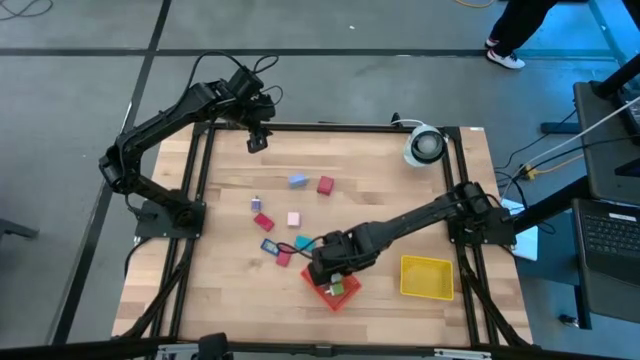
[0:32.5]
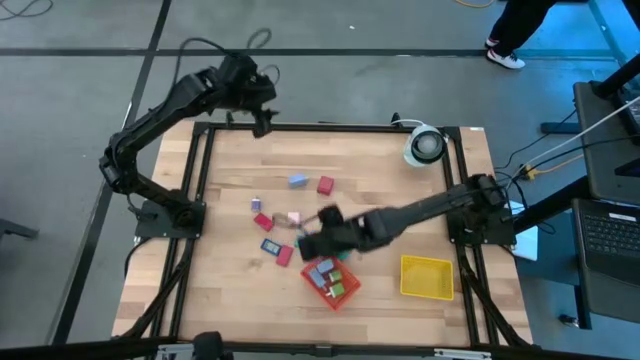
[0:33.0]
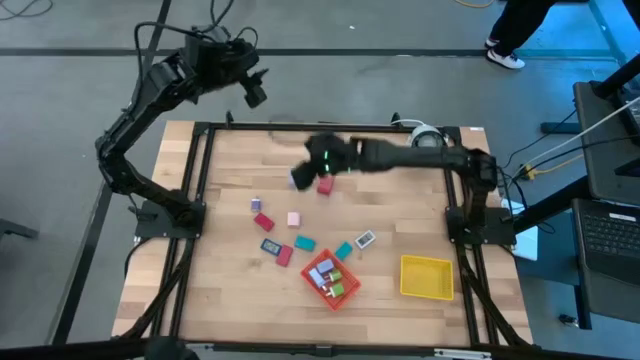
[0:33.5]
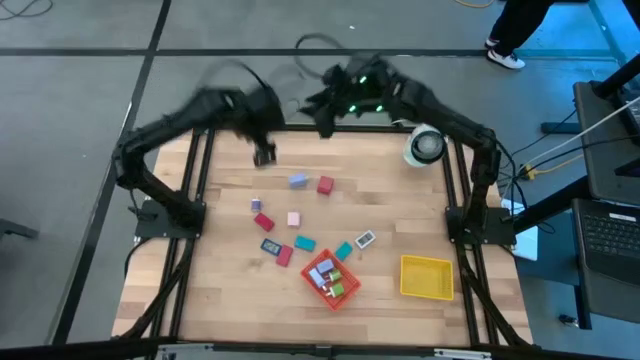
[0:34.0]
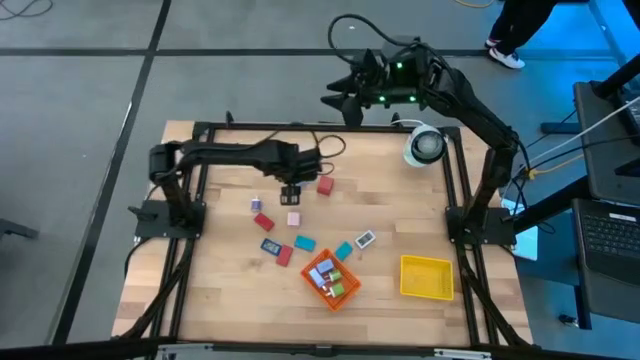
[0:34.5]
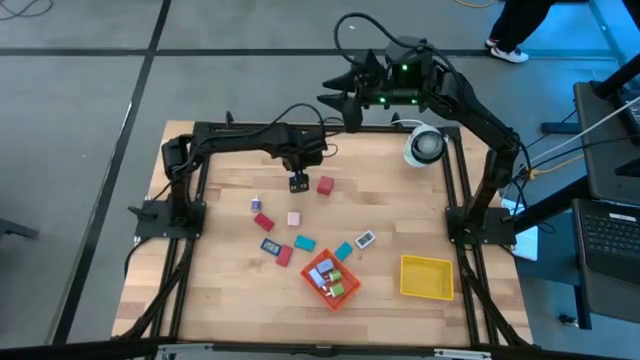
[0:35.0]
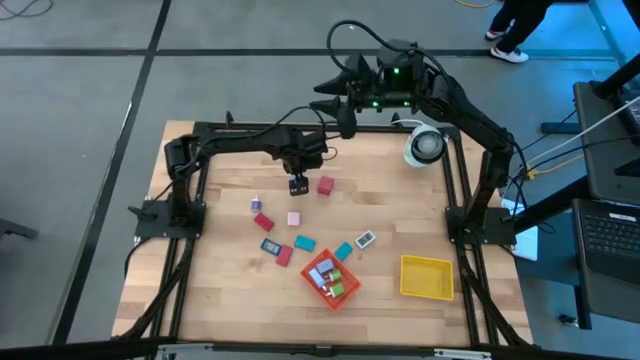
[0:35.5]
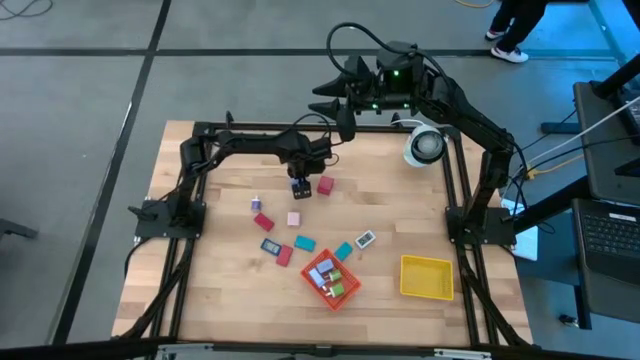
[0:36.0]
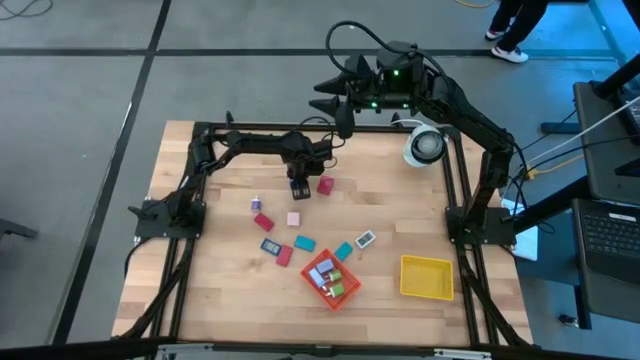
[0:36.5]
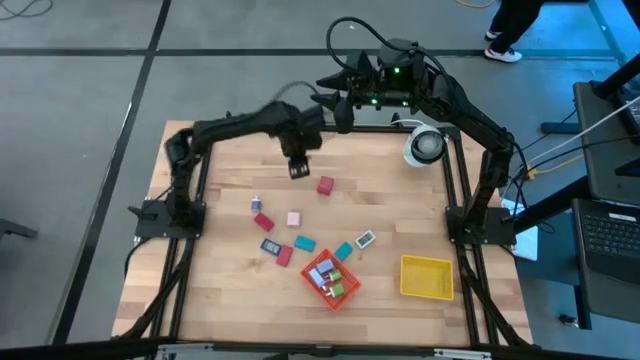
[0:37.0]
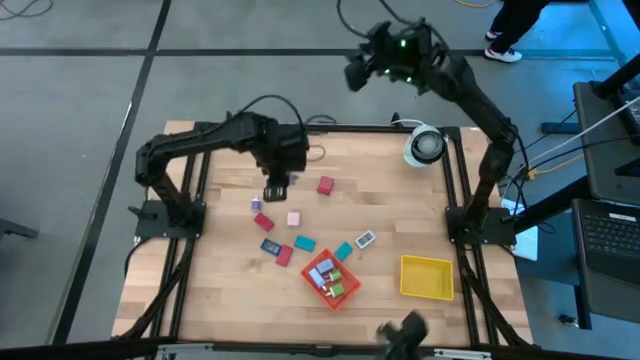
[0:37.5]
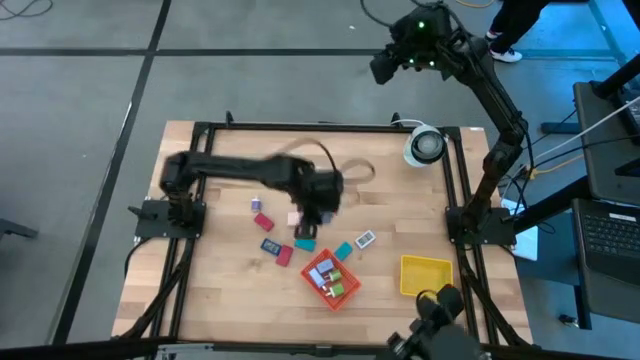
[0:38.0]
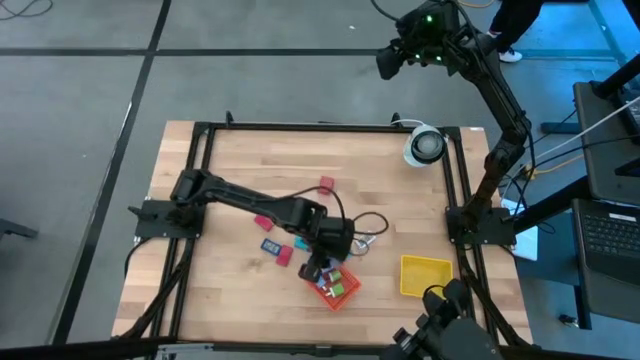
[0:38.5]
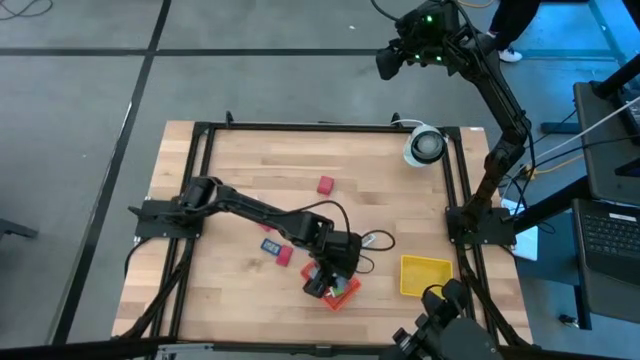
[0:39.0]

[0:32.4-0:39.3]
Task: Pick & Place Office items
Put the light violet charger adapter into the orange bin

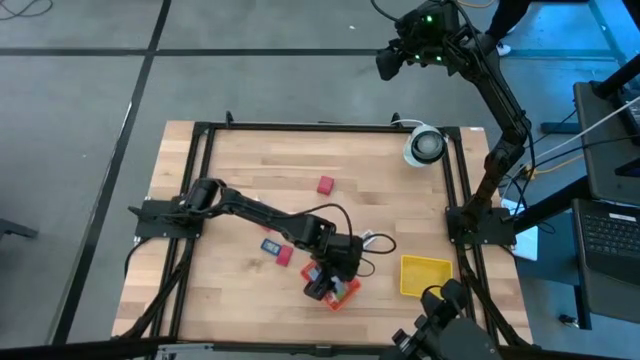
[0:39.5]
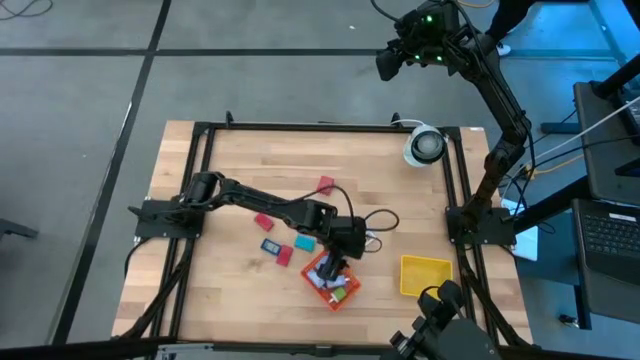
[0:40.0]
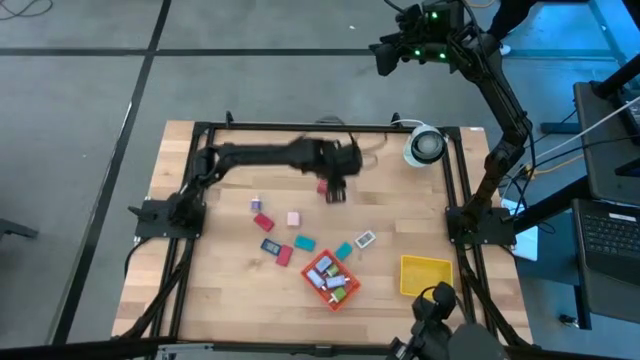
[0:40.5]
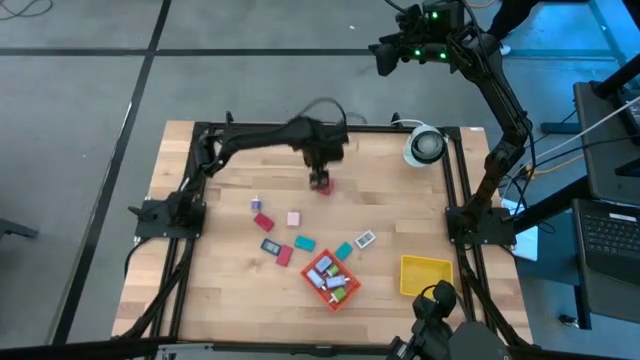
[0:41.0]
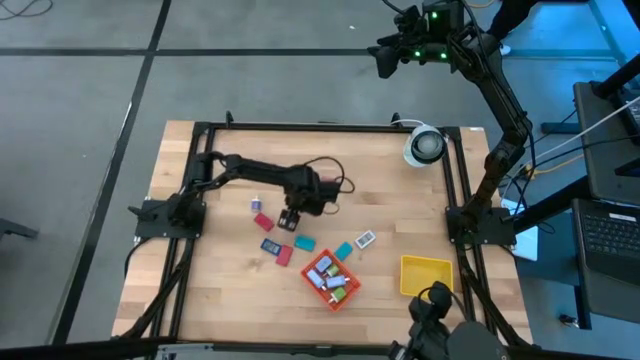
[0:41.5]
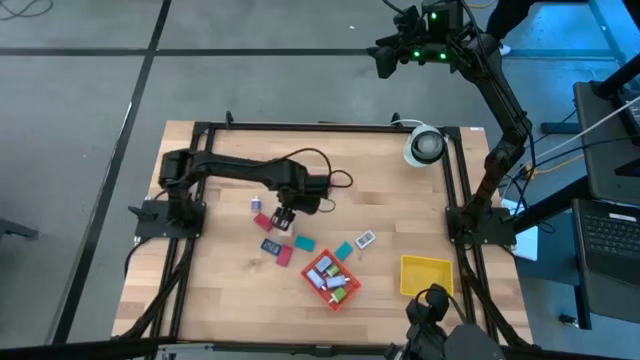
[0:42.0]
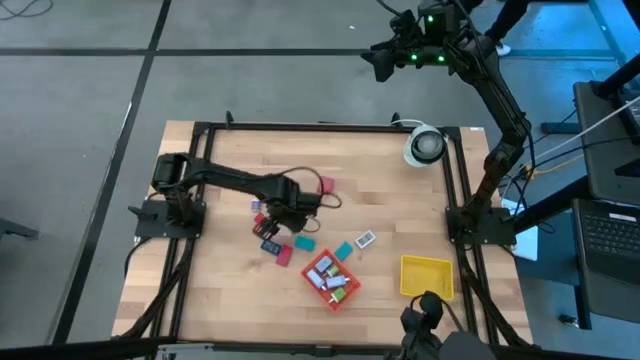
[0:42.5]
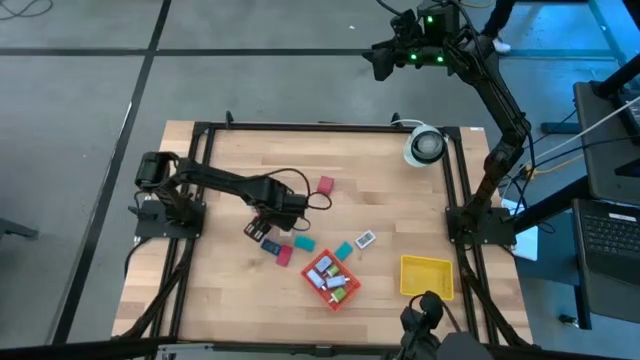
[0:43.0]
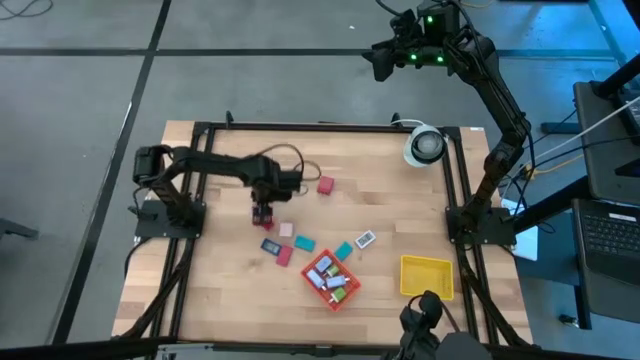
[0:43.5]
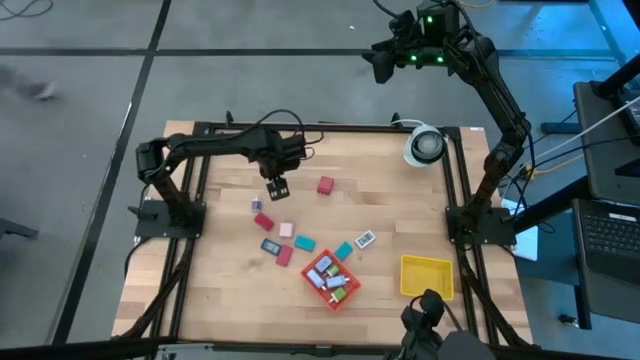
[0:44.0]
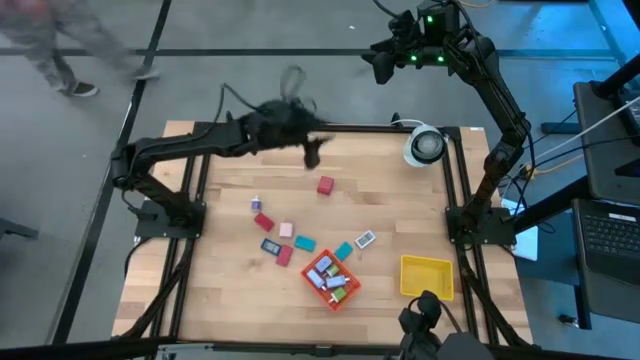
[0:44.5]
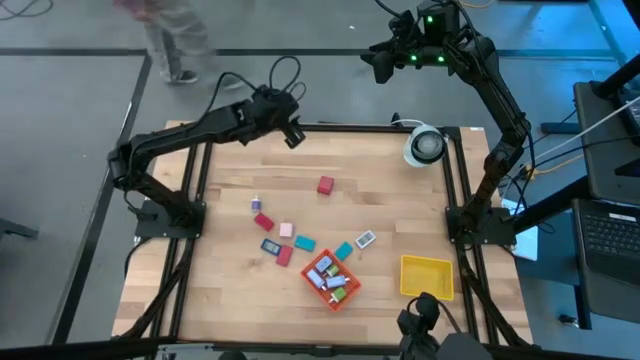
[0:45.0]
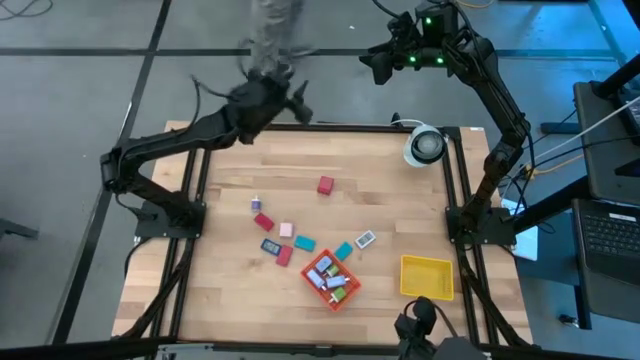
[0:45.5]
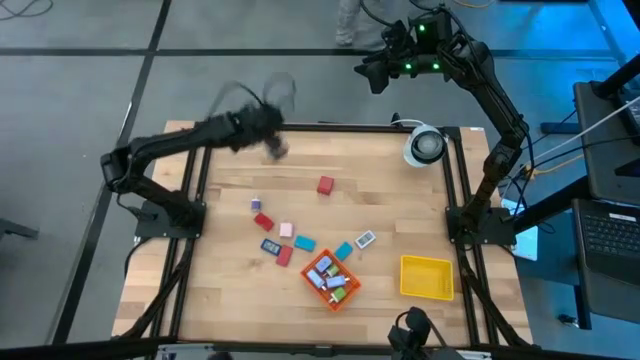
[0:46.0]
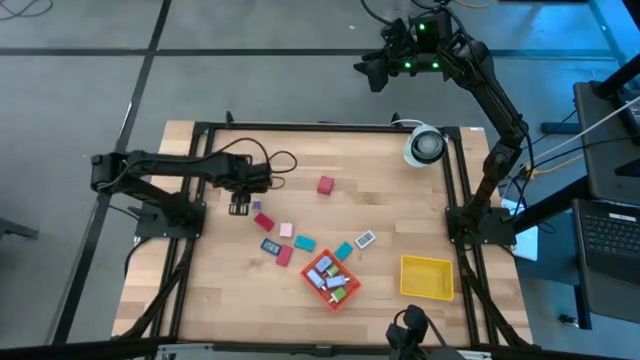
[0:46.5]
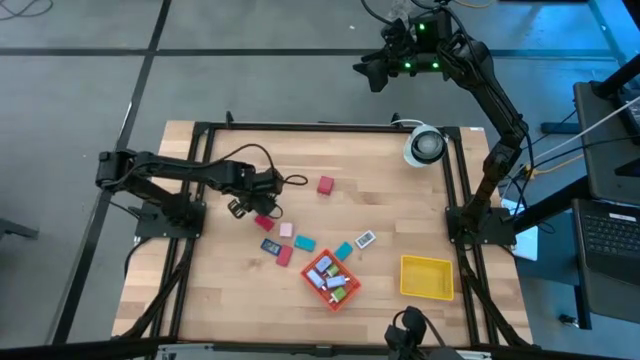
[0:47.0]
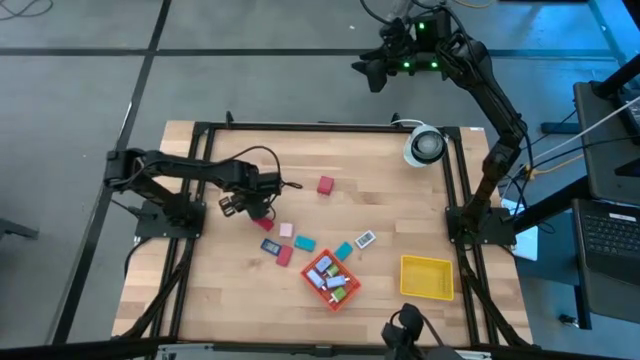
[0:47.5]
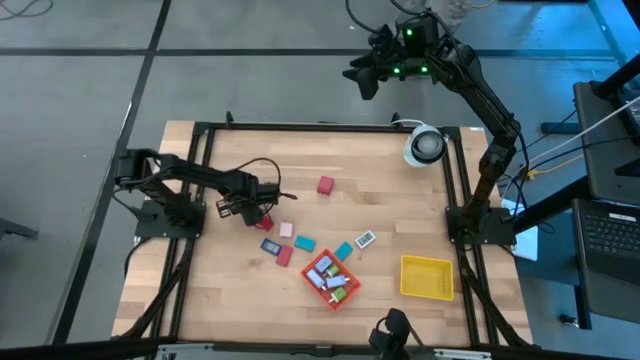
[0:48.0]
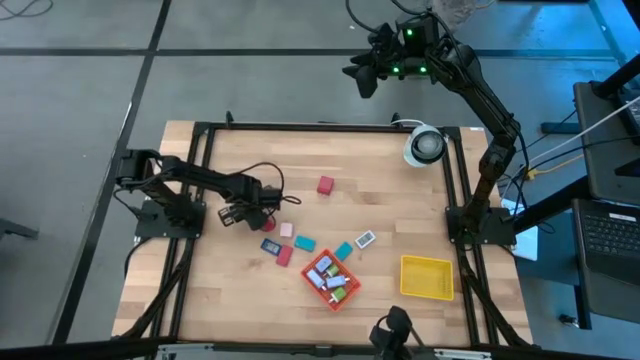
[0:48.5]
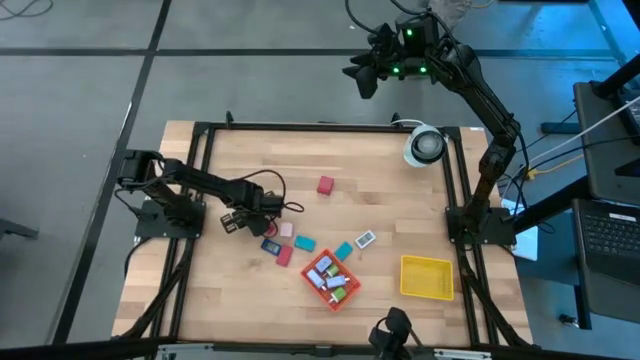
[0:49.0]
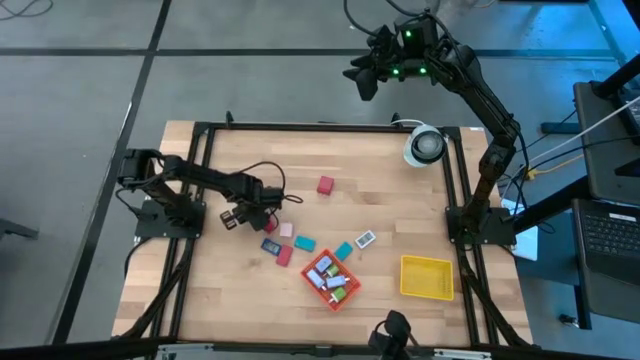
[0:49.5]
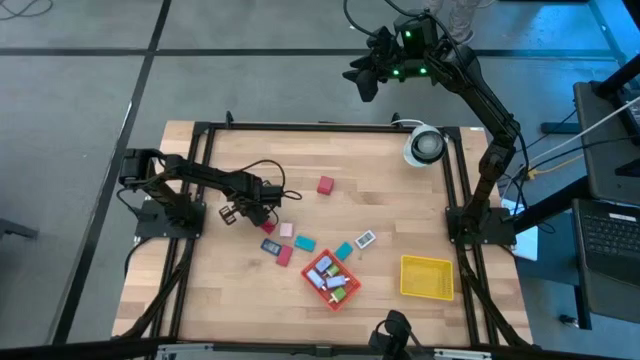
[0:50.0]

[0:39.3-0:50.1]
Put the violet charger adapter into the orange bin
